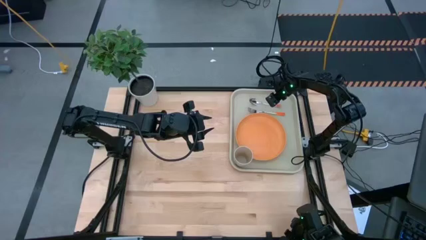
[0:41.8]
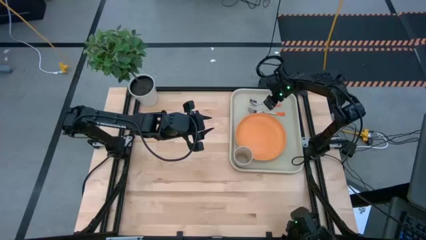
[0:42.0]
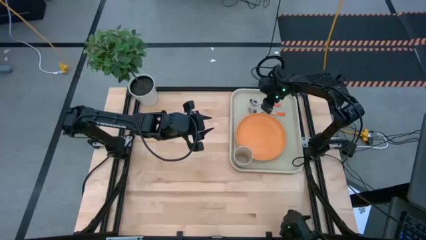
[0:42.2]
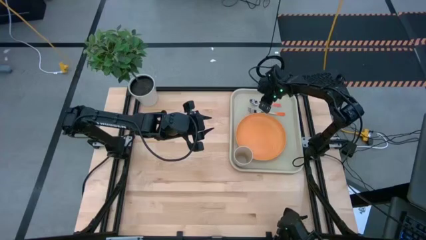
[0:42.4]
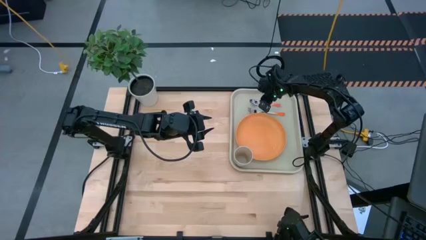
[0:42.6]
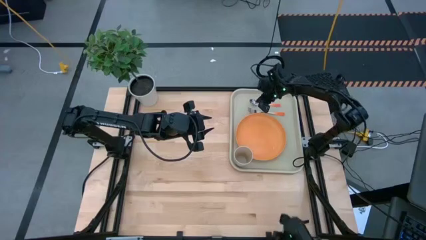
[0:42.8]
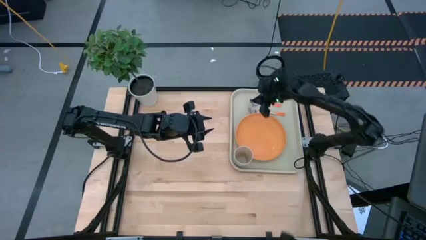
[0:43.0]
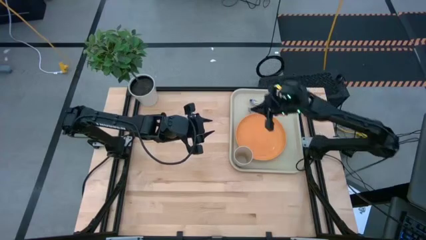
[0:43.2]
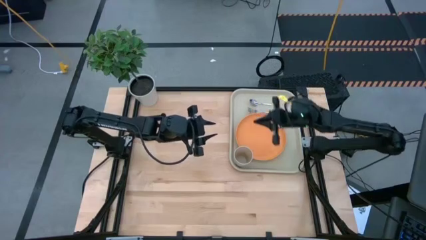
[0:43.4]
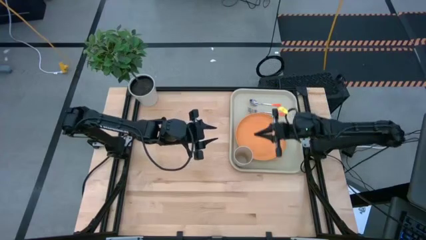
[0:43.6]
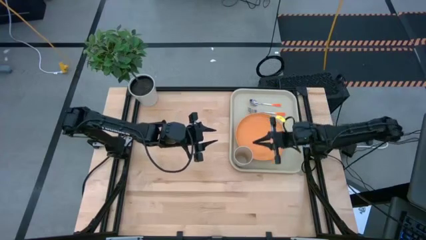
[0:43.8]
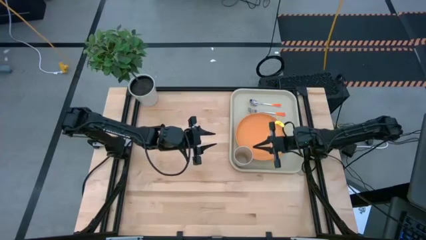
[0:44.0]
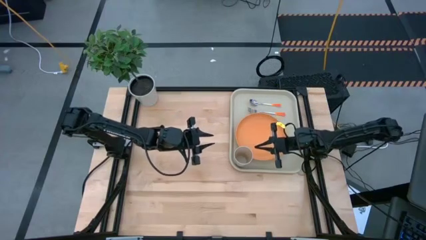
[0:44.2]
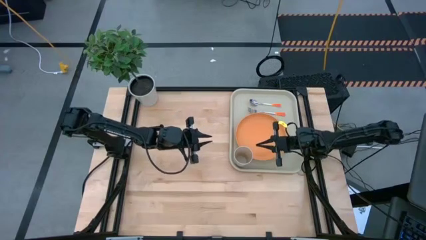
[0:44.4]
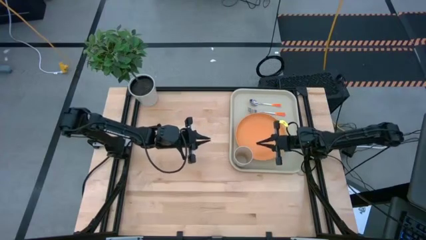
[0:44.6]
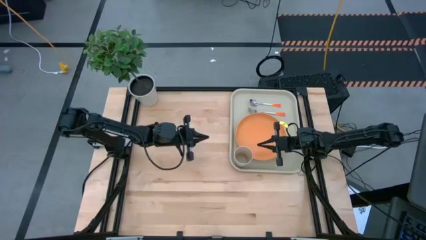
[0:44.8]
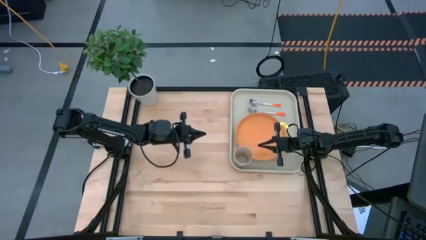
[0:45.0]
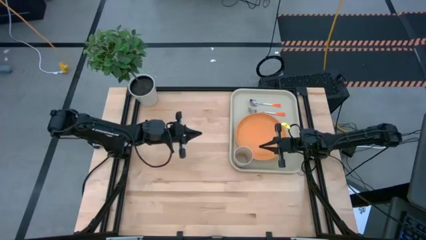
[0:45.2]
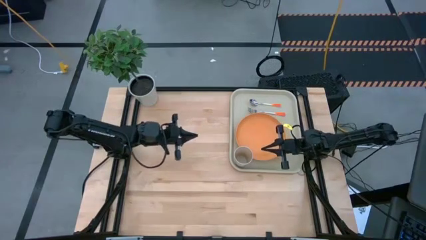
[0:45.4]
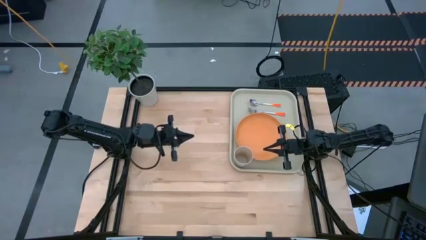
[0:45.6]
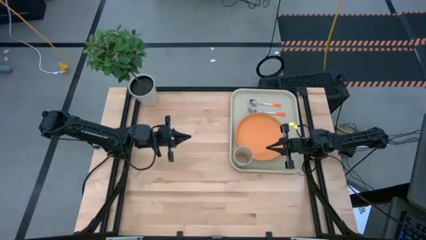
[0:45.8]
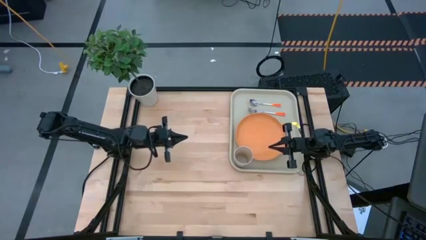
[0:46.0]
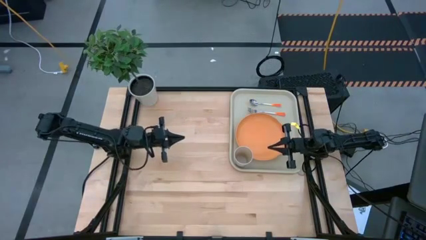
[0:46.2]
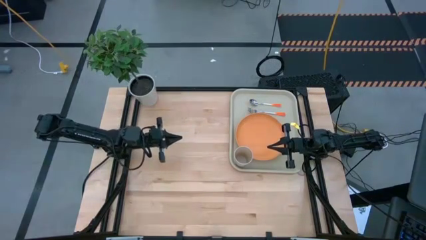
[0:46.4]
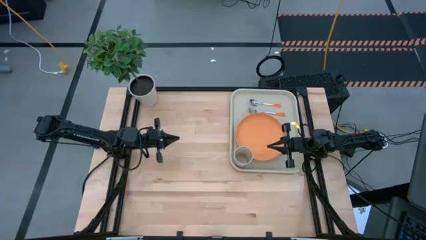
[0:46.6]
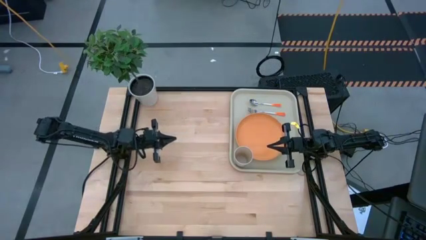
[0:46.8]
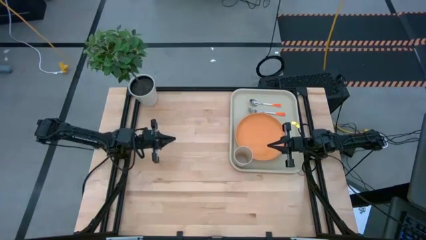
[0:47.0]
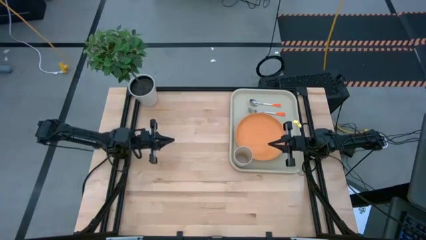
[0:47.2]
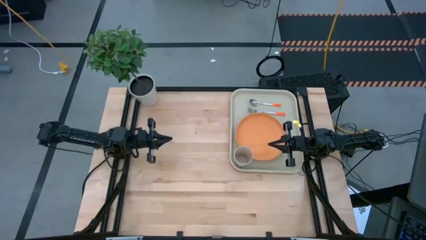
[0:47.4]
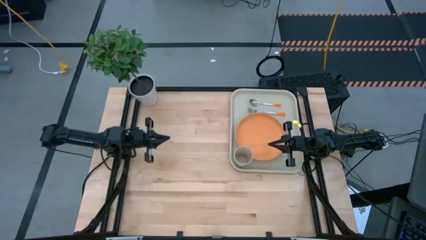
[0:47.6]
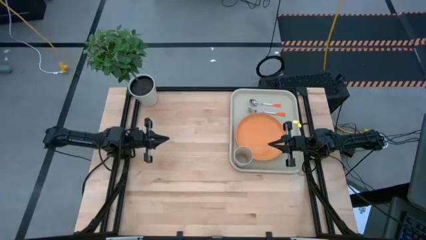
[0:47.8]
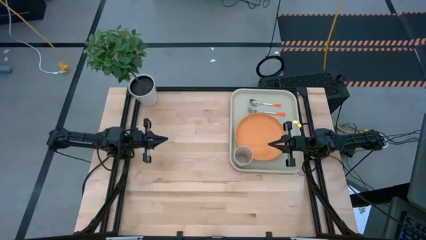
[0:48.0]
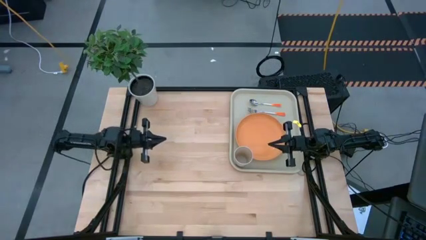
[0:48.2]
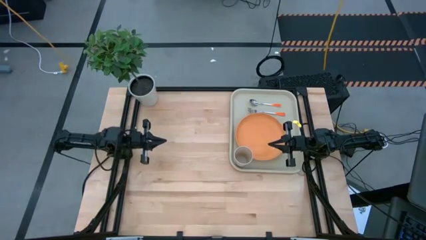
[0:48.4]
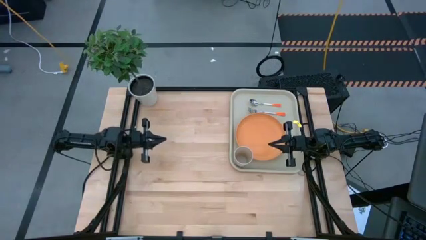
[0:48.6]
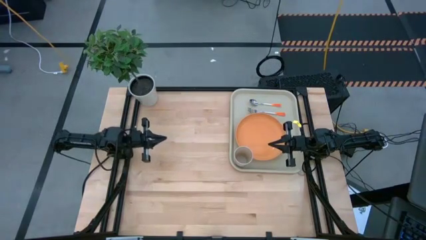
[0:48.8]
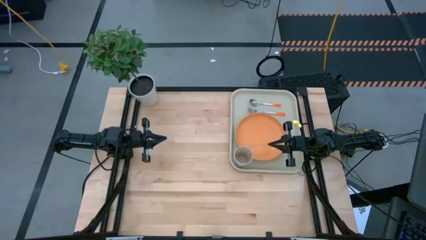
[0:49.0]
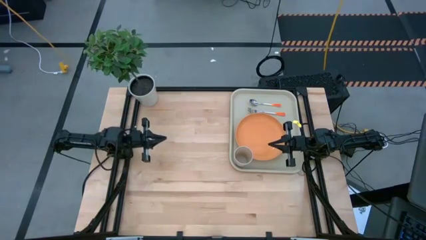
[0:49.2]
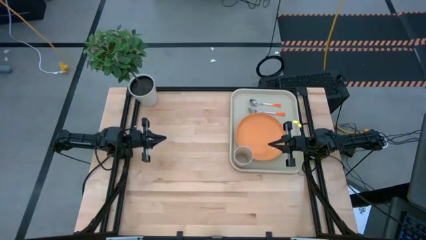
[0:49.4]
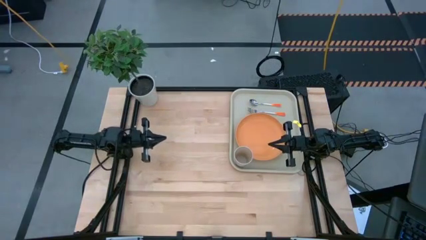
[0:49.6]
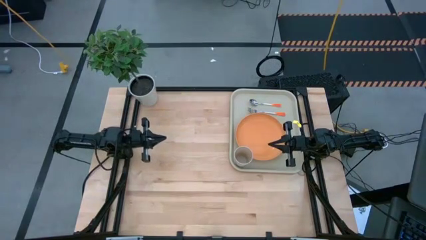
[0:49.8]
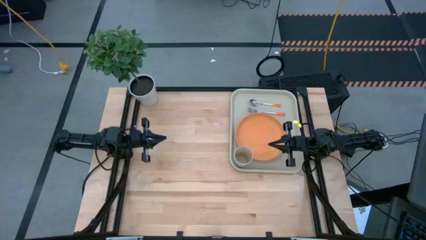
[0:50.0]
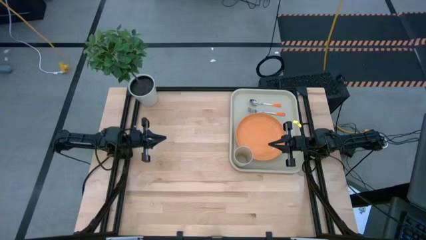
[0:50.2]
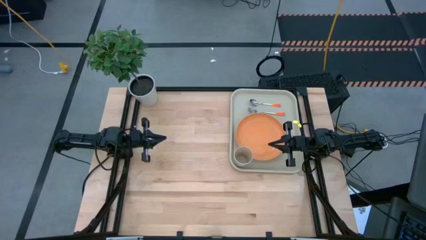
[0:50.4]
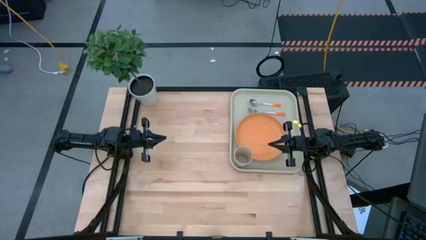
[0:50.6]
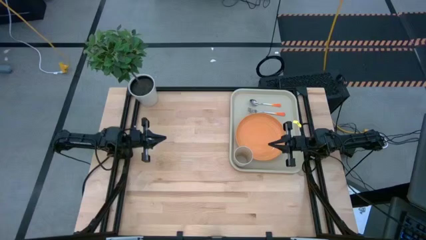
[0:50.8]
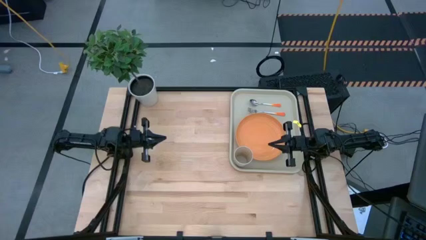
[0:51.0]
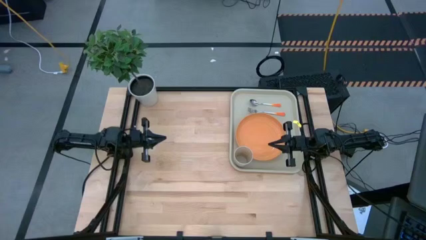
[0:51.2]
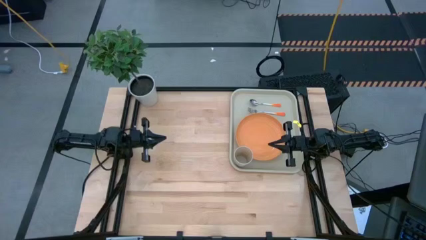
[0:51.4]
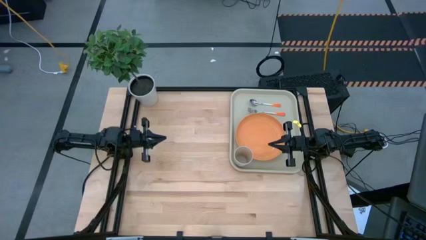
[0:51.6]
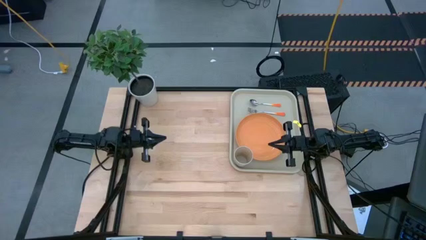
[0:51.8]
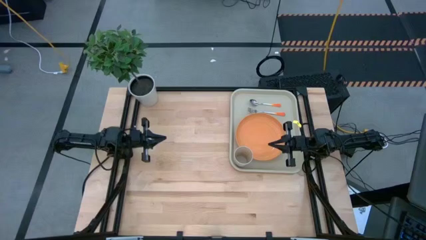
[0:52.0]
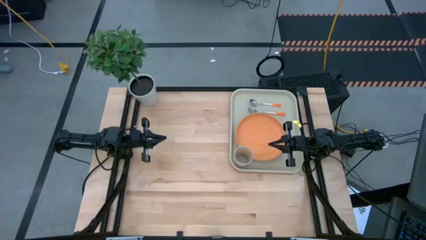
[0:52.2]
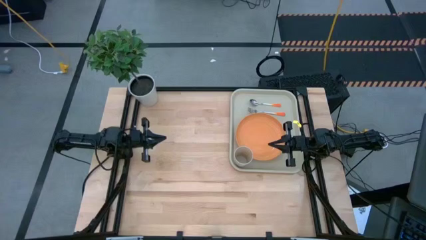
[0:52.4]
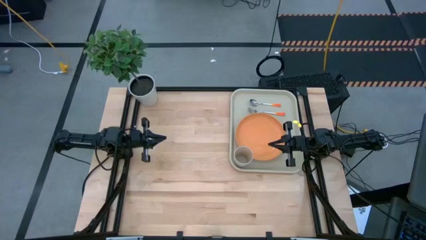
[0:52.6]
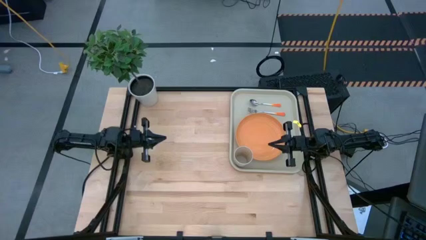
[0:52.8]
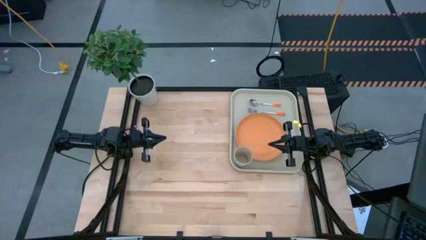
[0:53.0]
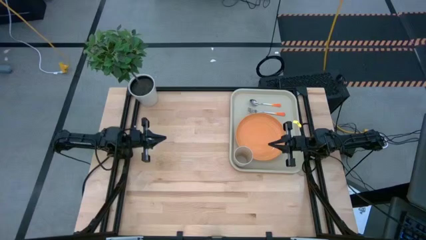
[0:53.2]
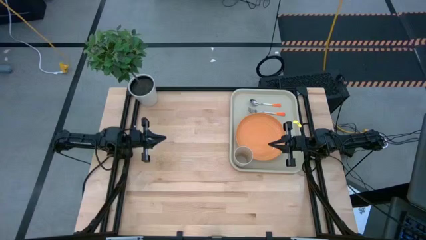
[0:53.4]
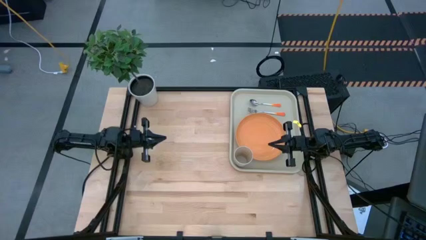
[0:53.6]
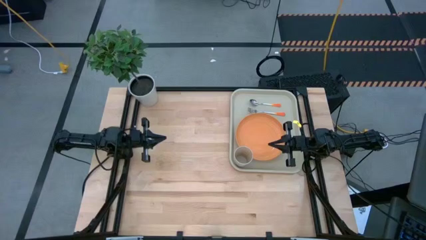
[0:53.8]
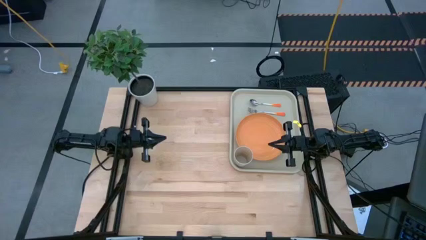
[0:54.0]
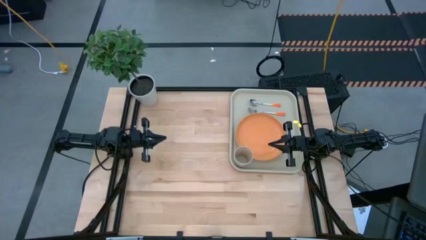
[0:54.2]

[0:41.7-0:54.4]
Task: Pick and place plate/cup/fork/spoon on tray
Return to Home Position
